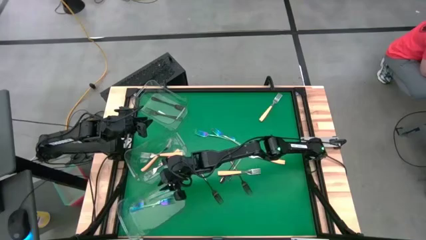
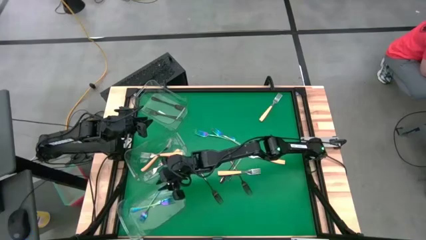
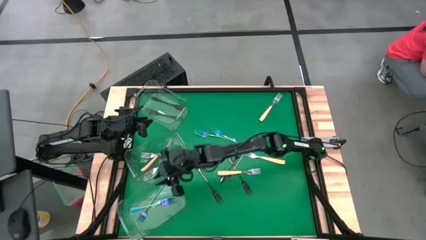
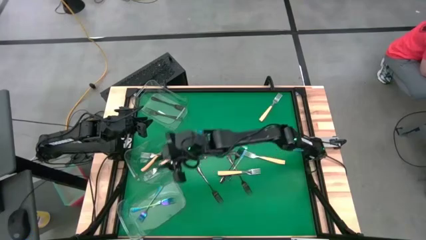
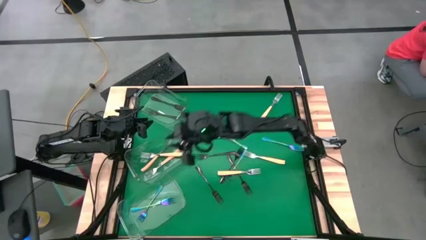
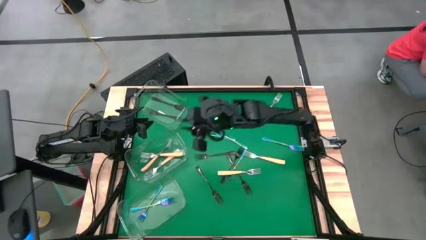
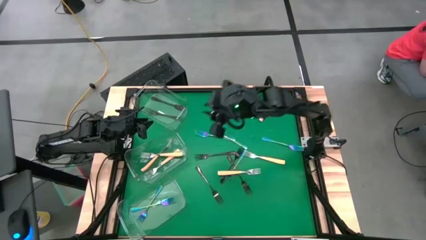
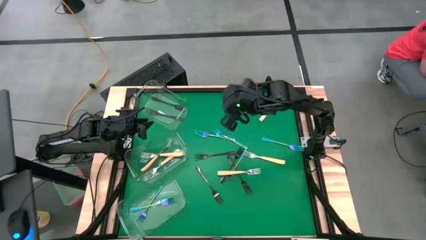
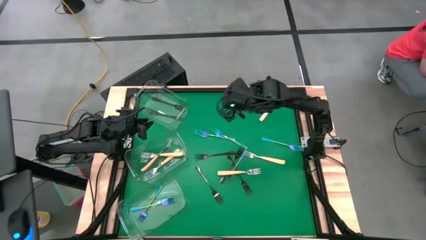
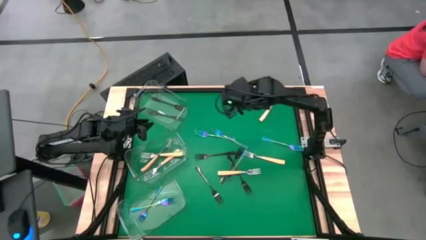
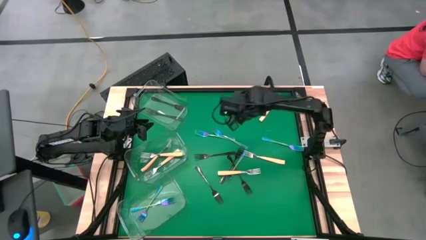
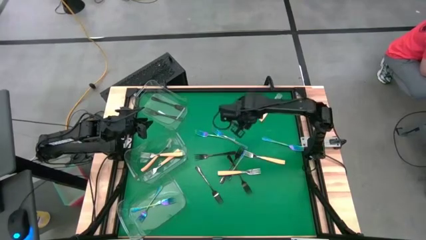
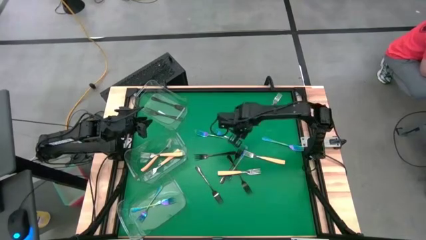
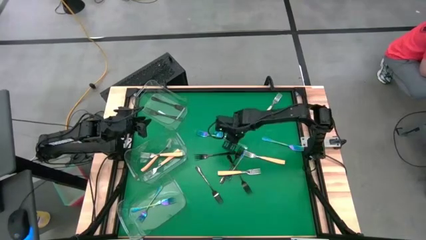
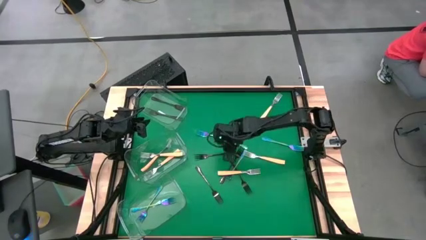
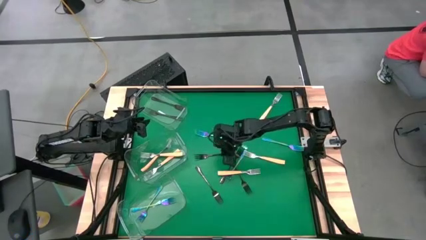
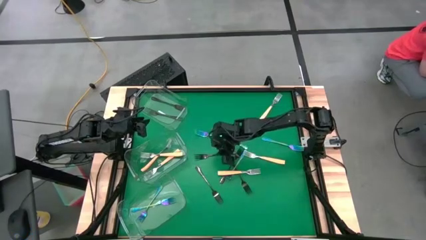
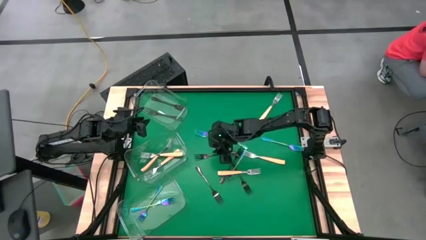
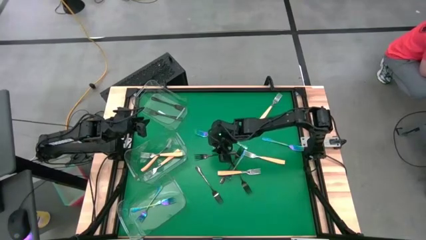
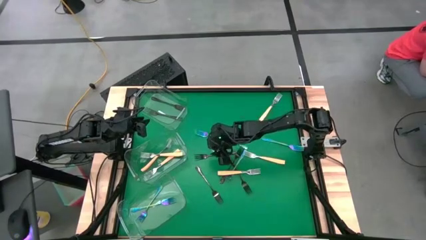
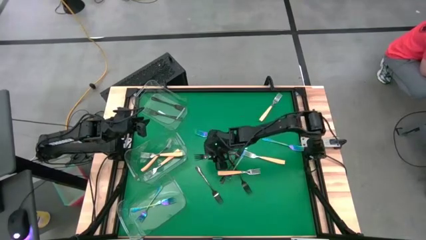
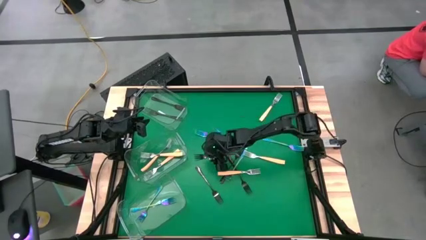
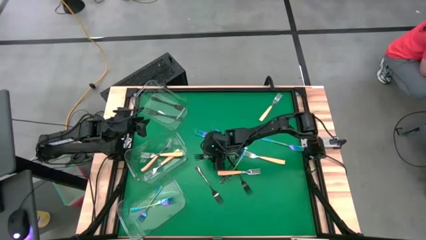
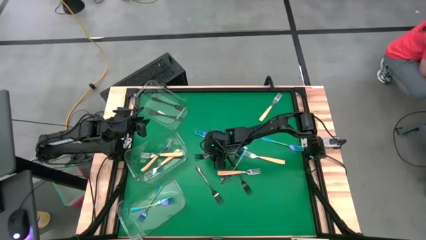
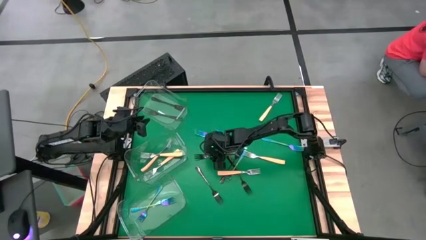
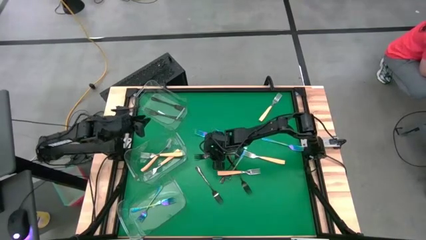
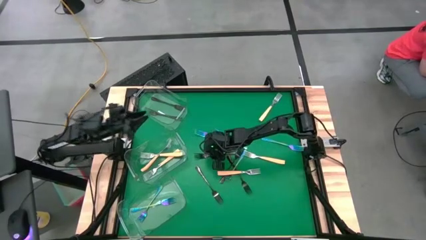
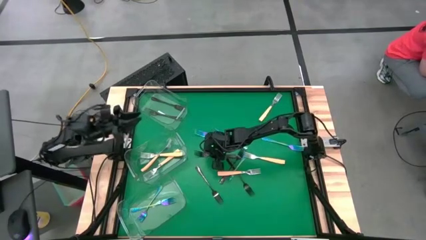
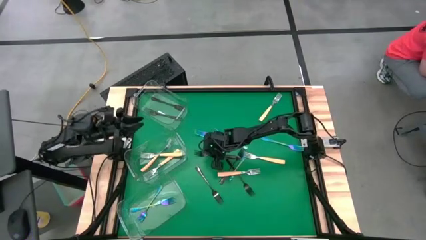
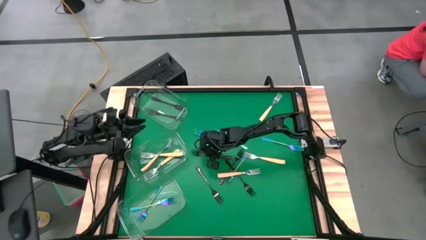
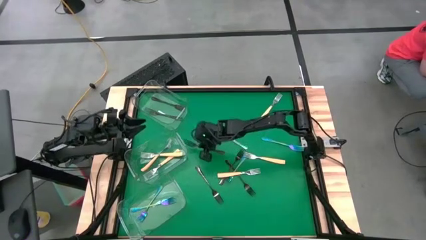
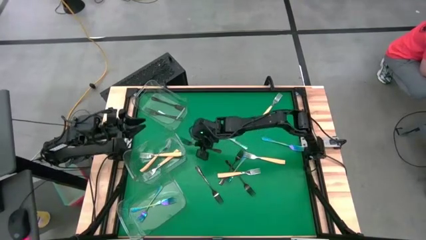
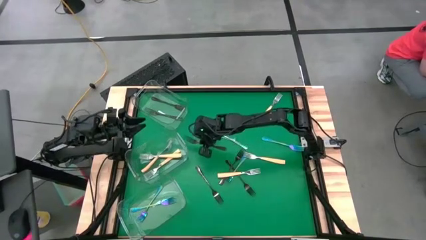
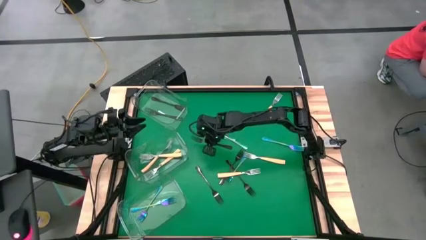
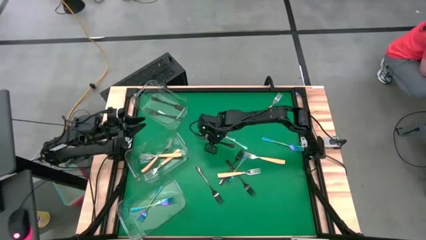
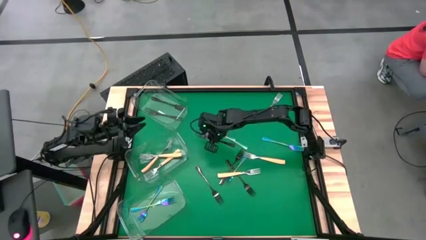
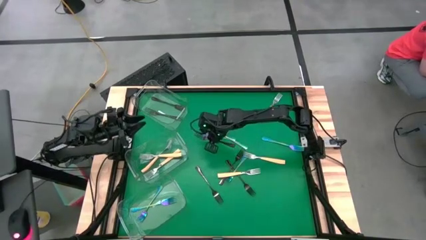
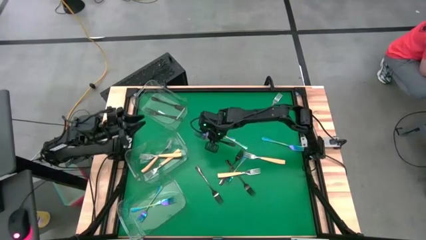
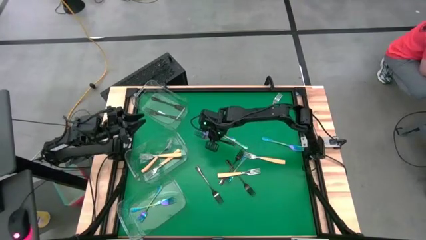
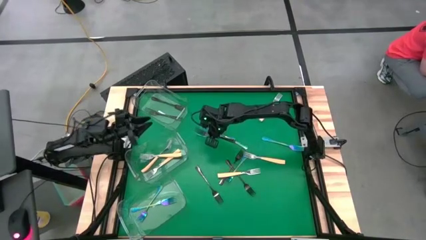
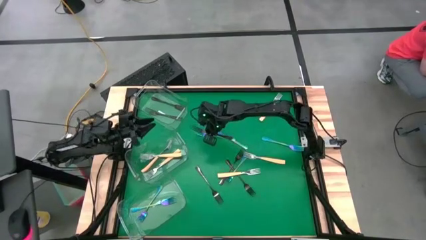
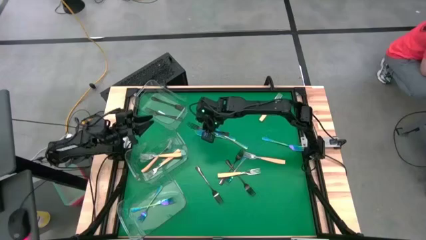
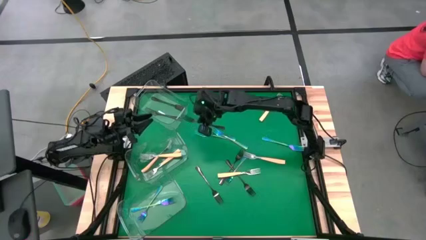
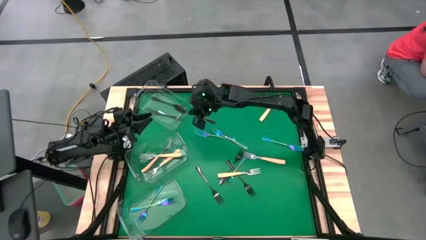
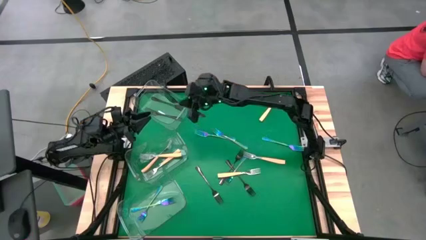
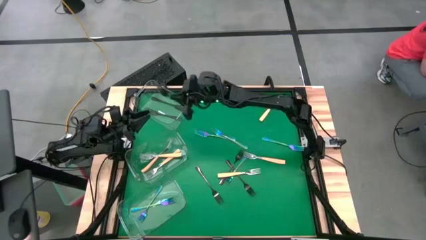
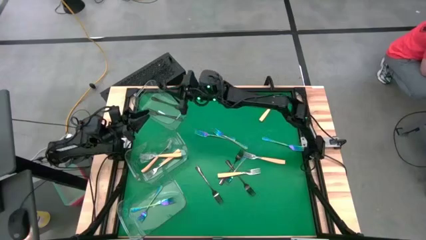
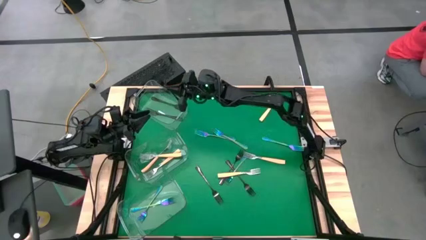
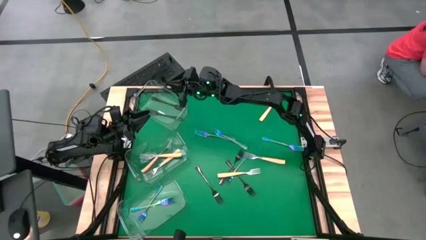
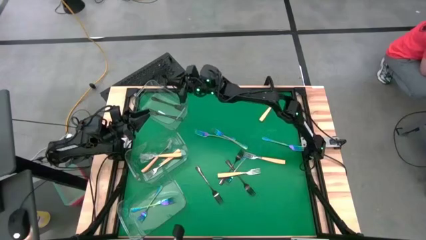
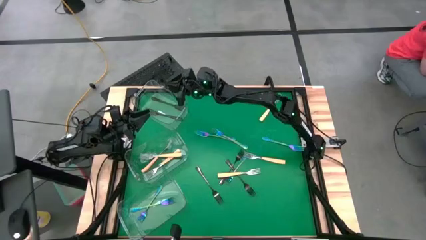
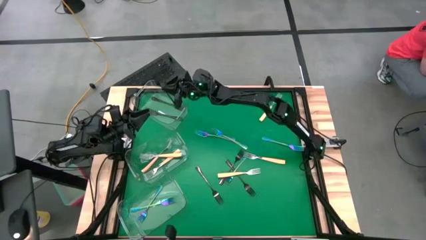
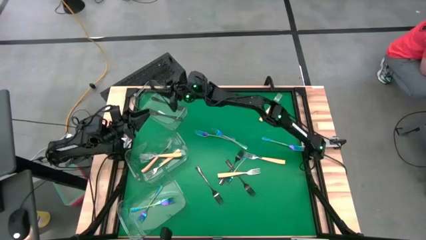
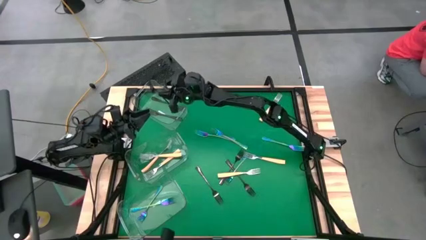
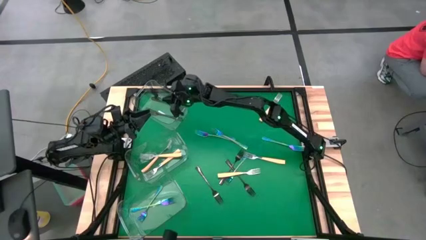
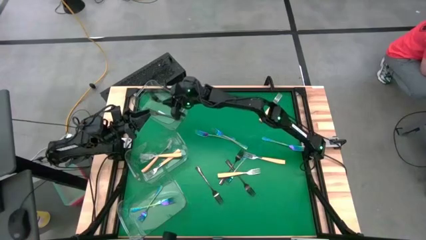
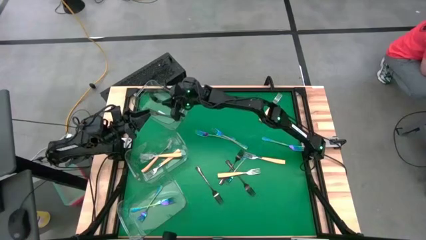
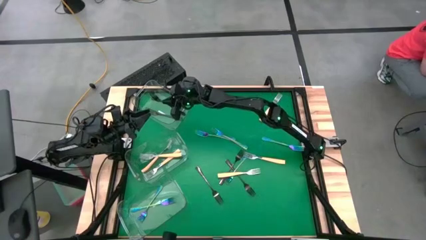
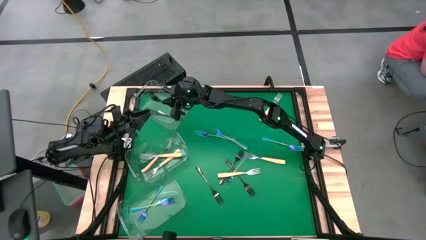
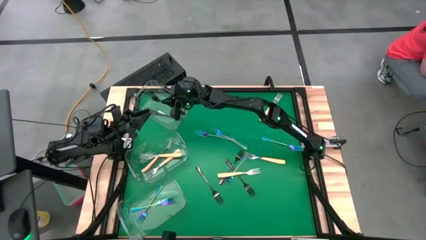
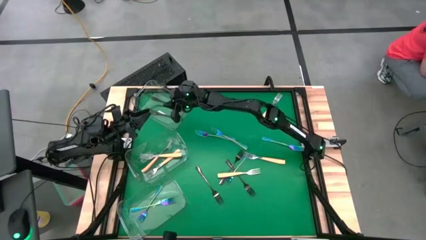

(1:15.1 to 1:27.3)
Task: Sort silverware by color (type)
Put the black fork into the top transparent bin

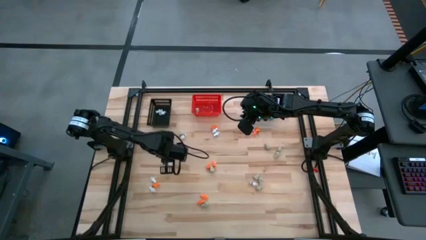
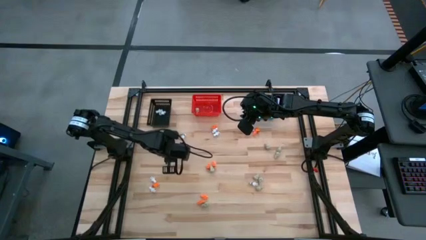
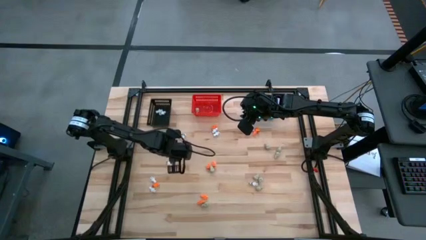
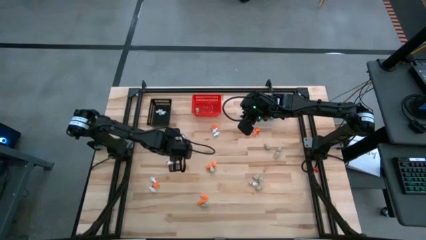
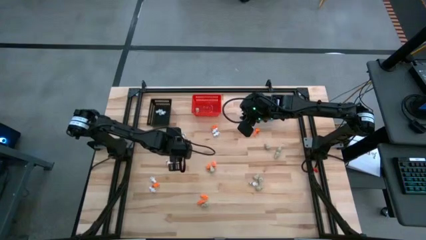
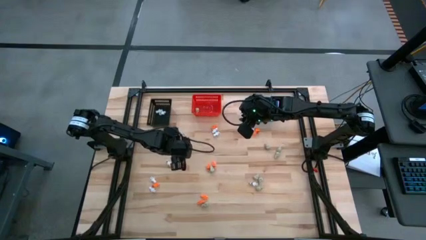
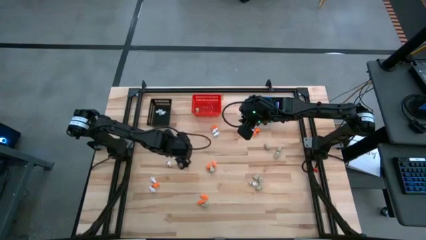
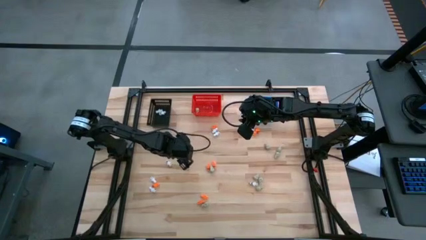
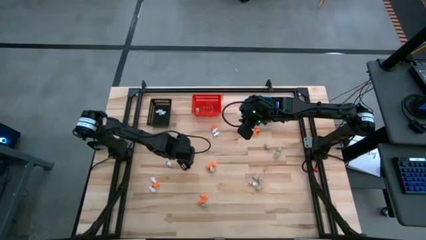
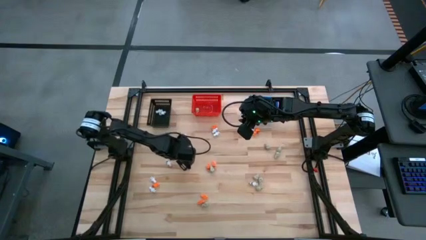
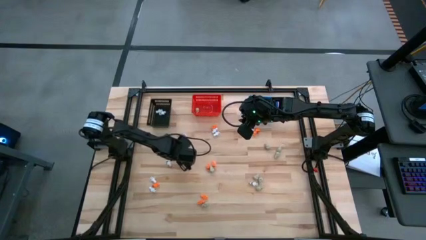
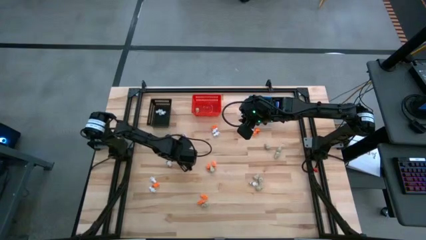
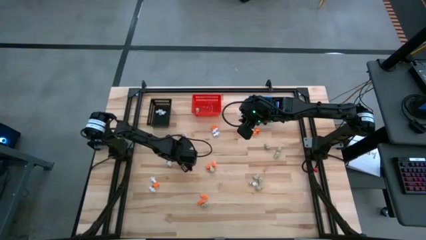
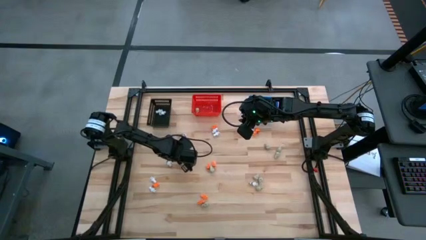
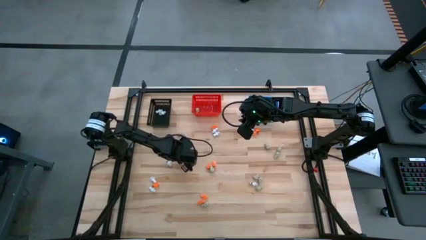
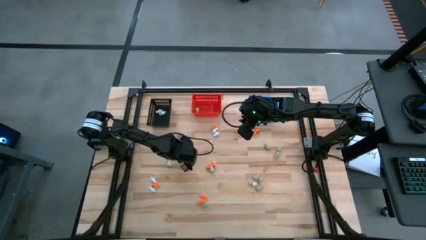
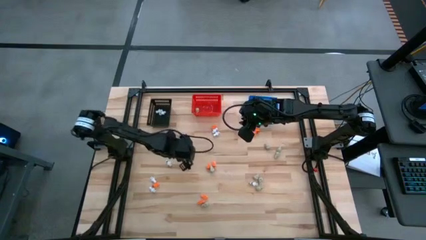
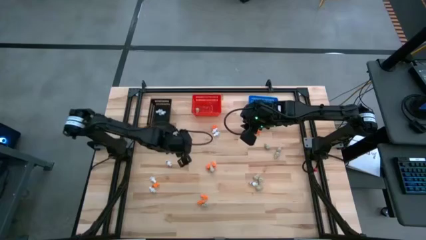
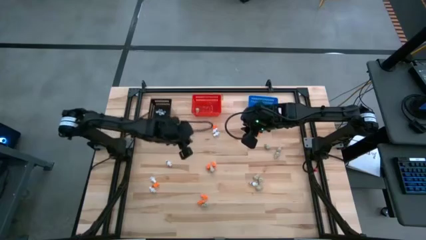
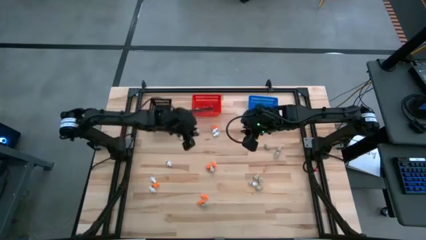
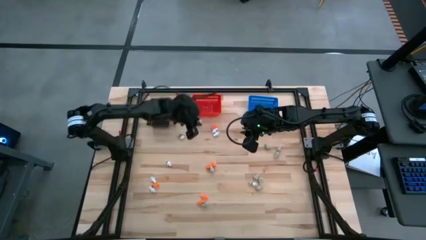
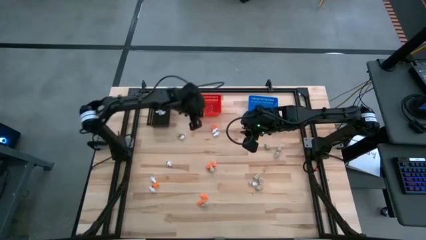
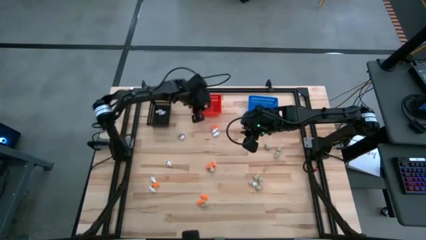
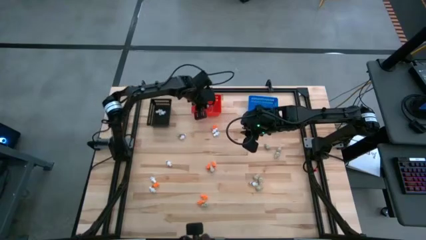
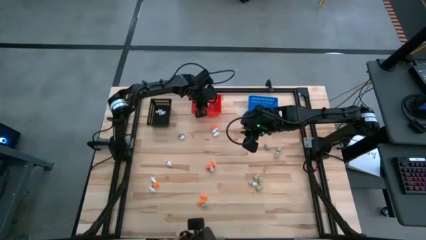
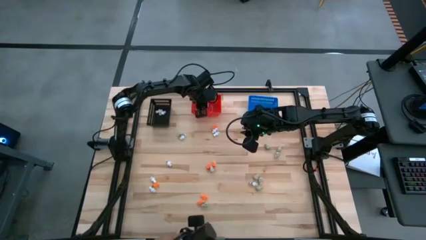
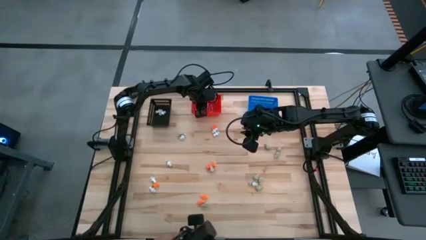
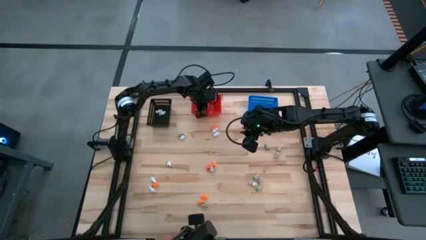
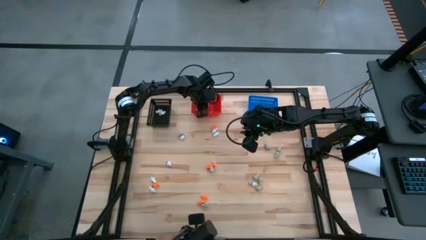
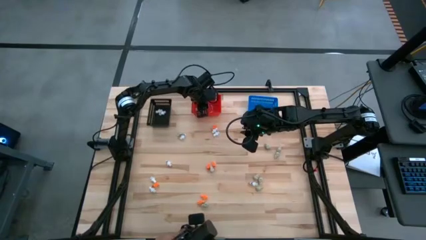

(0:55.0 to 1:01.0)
Task: Sort Halloween decoration
Put the white skull toy into the red bin
